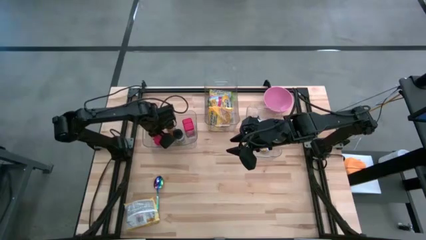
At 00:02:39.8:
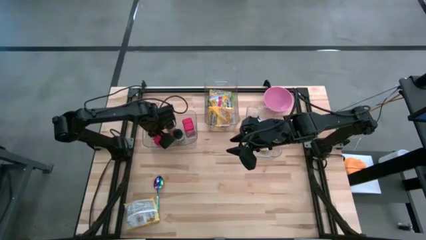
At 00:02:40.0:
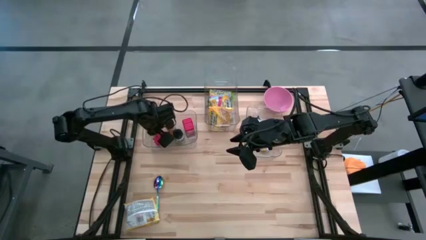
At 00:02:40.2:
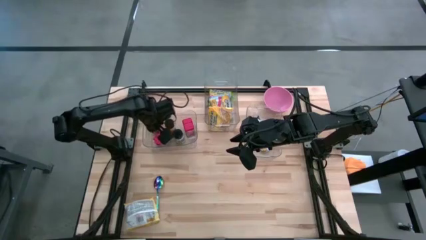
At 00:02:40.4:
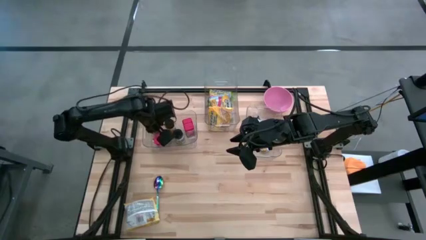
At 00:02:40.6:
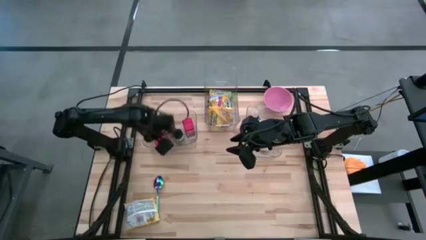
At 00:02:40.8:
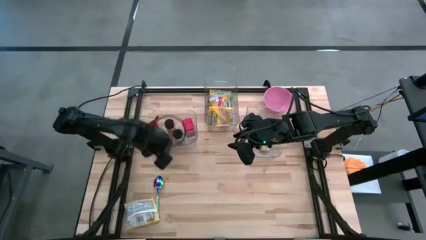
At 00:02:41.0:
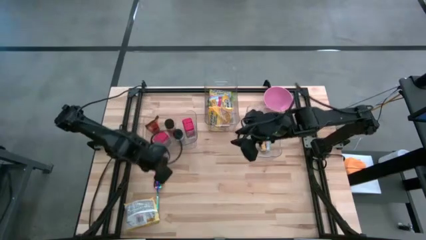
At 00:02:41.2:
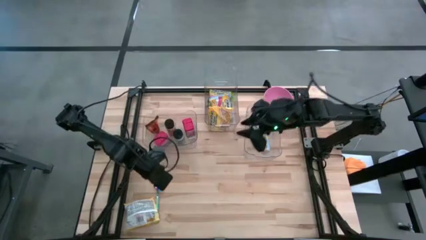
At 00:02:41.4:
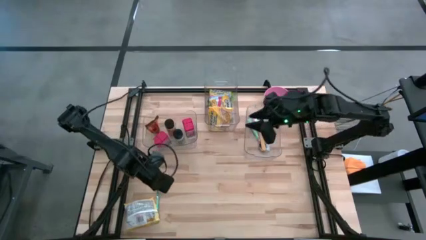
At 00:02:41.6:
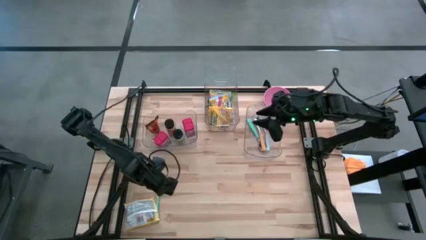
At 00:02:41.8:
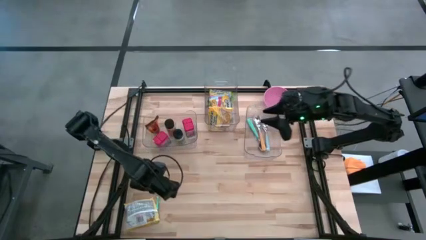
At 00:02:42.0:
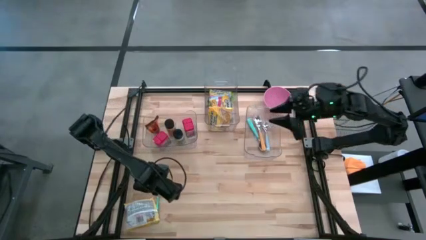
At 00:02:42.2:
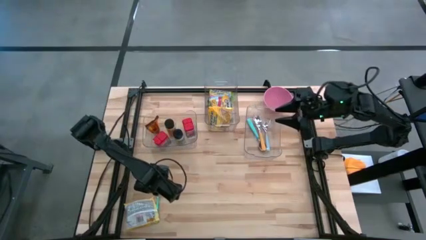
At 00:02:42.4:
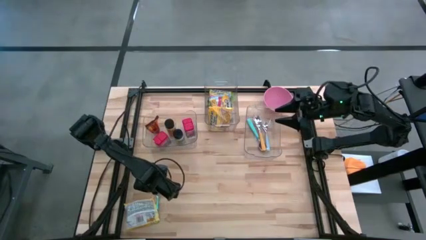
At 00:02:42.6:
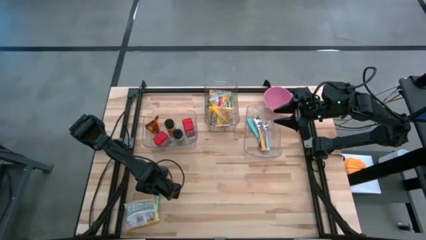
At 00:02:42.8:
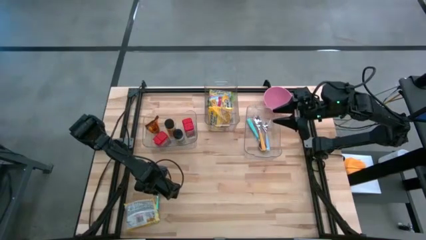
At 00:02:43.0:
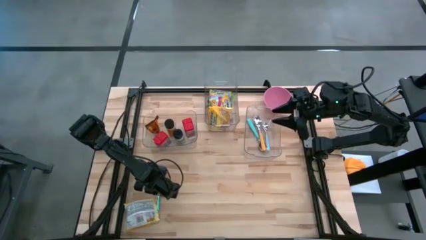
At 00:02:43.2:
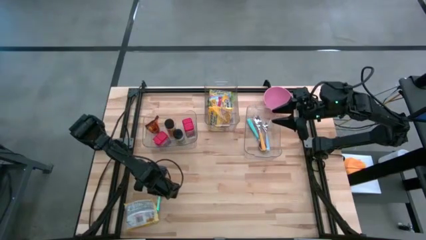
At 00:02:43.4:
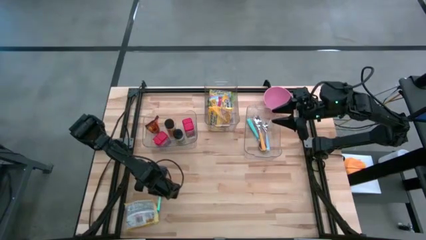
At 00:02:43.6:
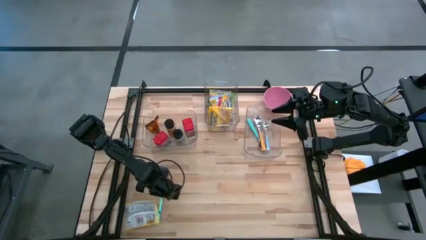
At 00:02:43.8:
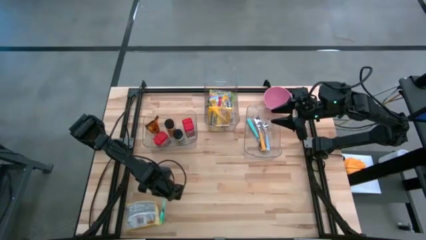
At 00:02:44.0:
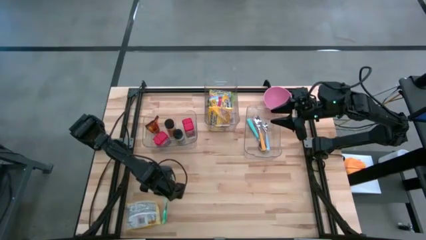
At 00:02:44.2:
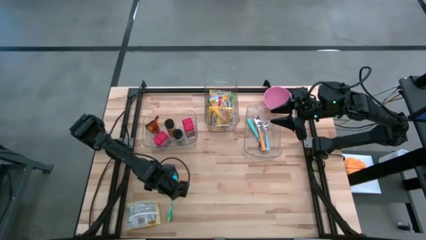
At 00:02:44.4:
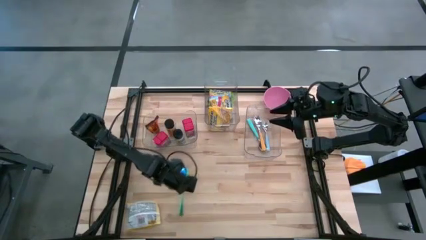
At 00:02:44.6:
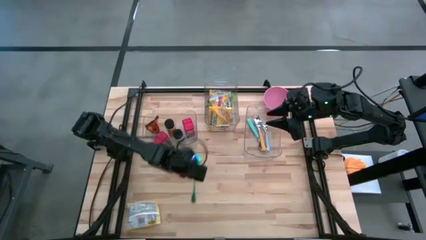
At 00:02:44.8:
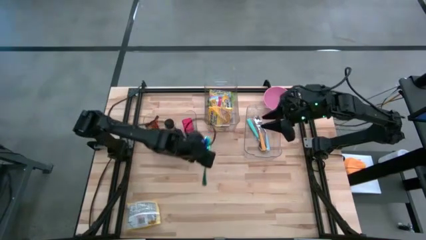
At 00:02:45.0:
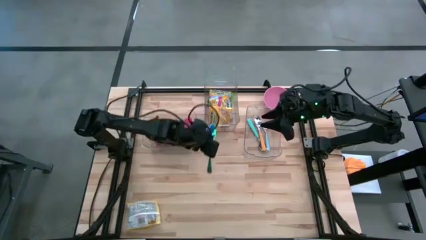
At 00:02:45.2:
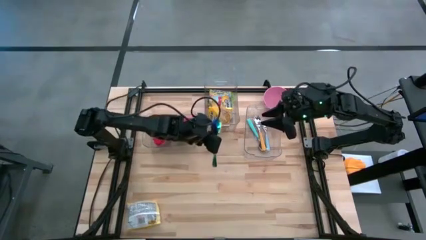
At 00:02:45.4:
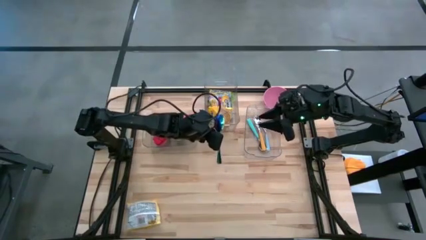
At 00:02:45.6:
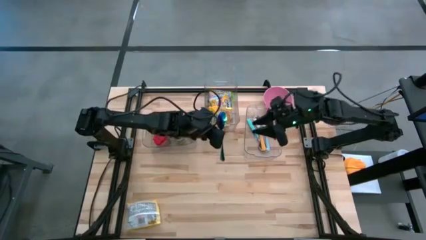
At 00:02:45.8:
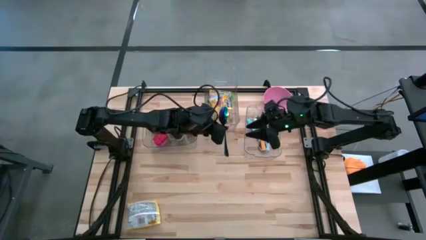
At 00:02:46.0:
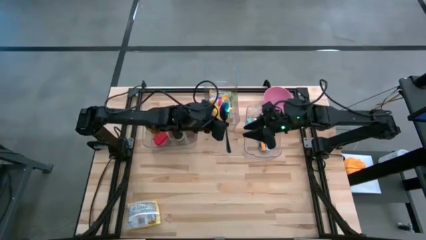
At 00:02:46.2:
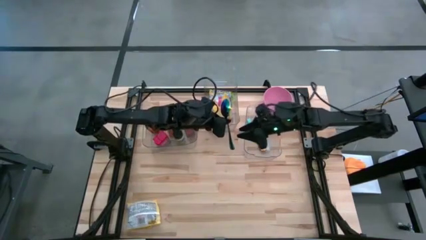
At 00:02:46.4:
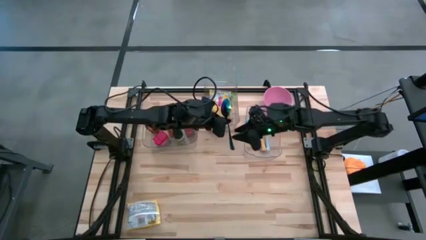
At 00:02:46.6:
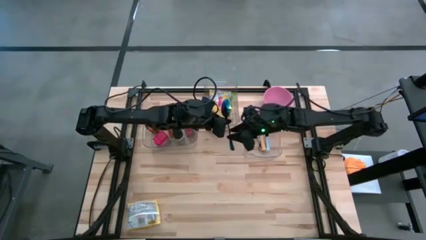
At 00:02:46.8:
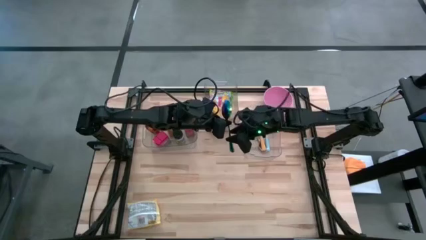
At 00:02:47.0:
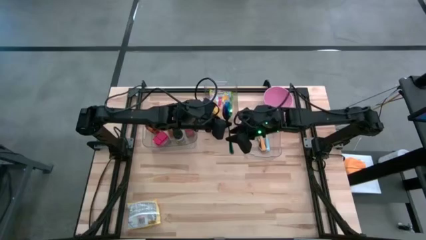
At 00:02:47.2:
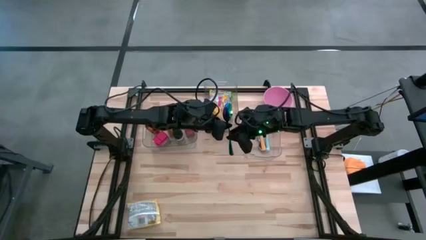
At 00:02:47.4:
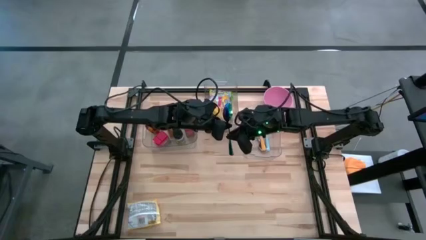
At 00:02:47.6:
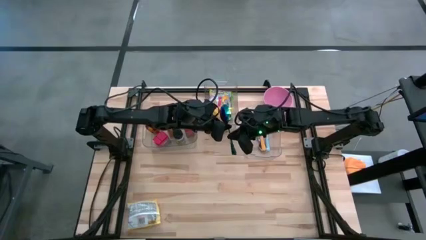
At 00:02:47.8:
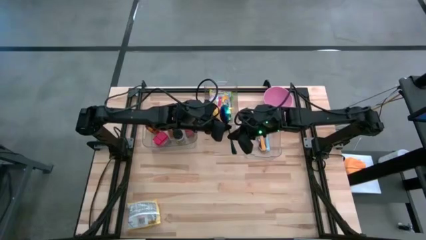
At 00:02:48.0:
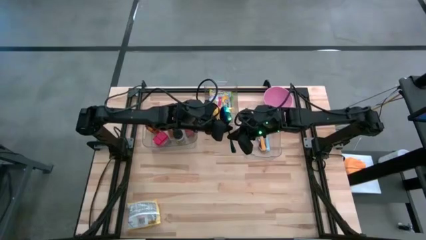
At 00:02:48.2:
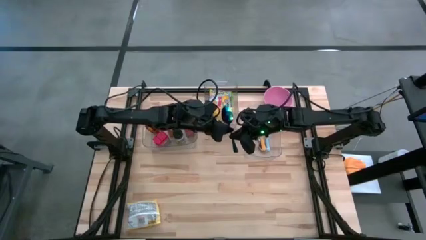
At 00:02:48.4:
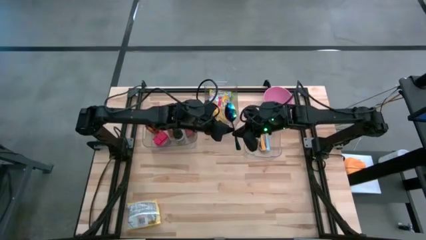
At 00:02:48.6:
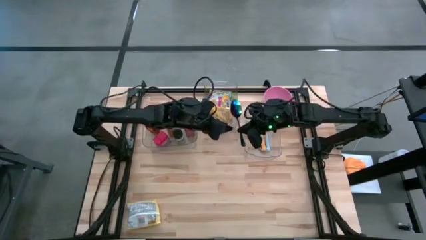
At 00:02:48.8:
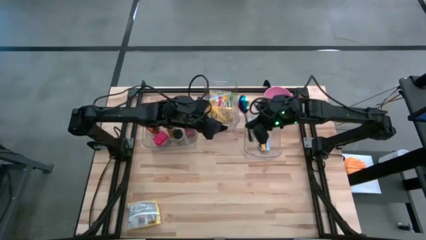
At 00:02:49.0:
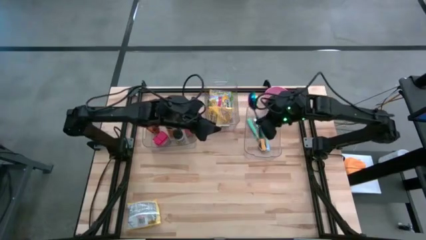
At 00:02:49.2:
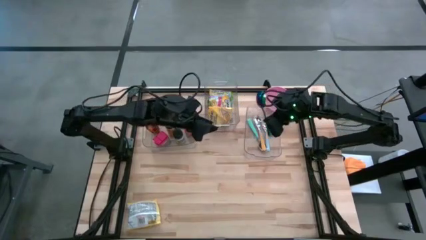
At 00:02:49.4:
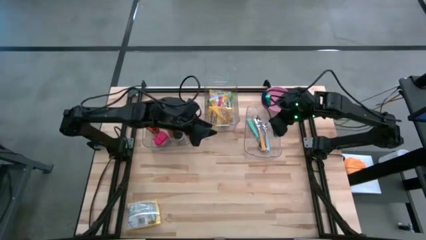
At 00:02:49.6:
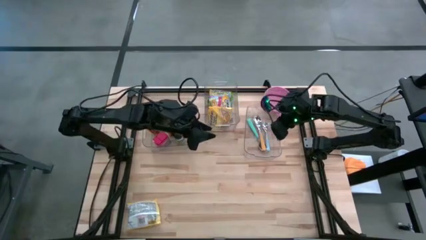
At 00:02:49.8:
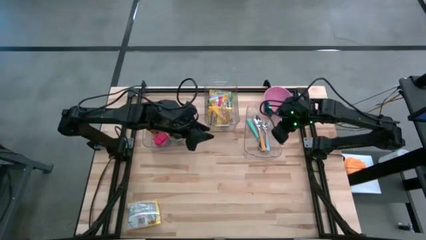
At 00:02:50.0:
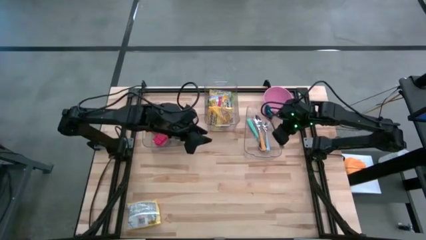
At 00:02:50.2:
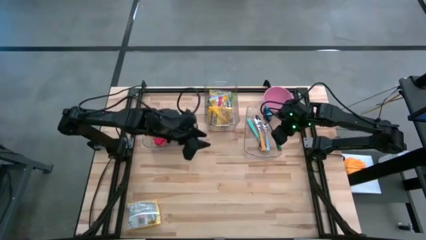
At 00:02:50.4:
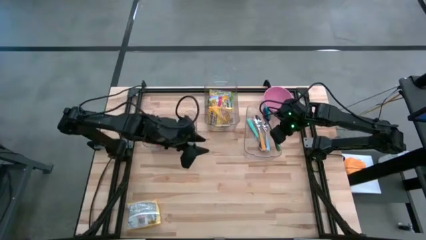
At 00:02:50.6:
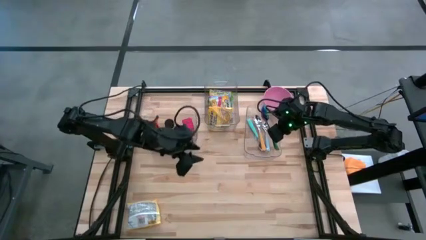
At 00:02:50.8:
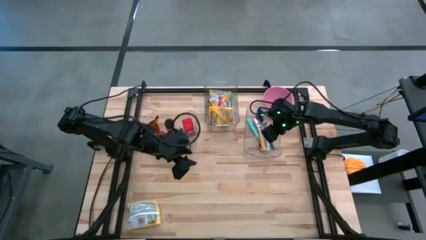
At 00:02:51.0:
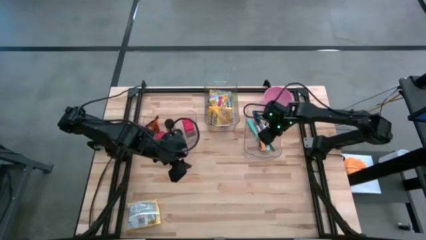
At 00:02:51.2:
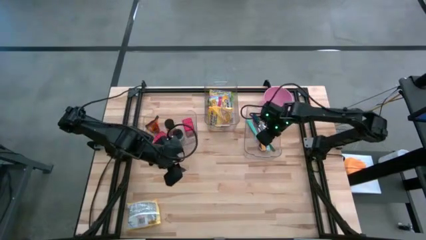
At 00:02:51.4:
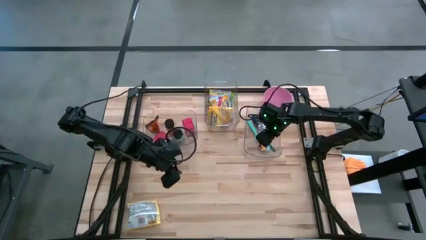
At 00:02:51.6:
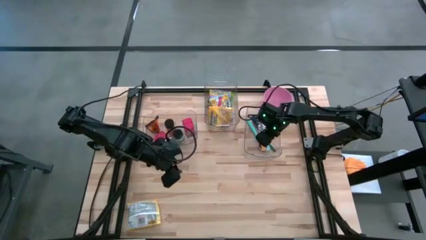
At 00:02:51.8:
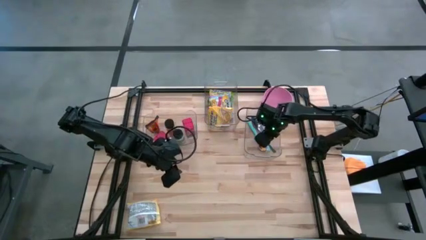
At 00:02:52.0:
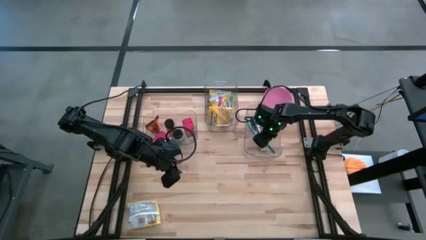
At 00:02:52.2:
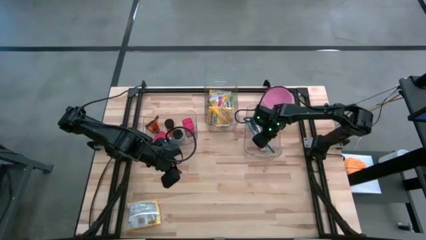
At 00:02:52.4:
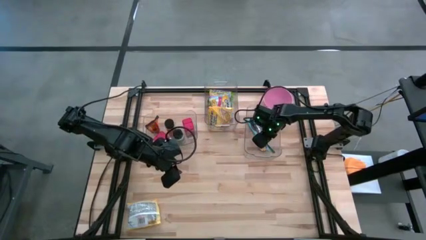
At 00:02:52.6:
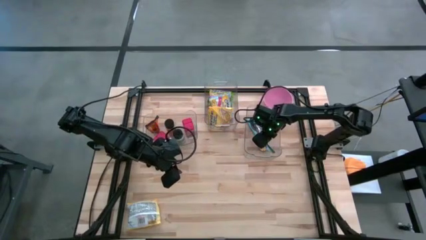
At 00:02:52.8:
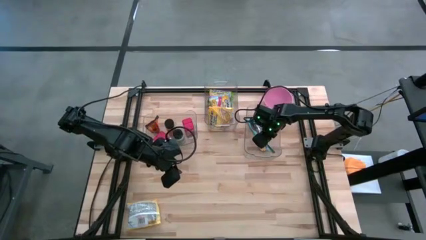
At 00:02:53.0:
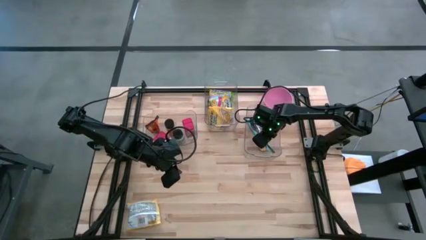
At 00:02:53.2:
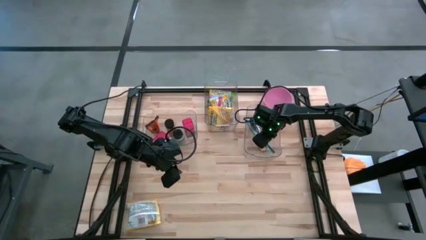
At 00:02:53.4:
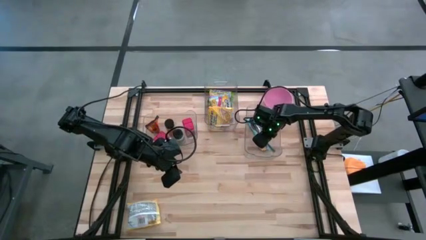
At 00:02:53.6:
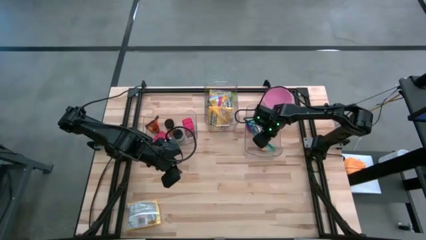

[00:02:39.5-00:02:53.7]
Put the violet spoon into the right transparent bin
